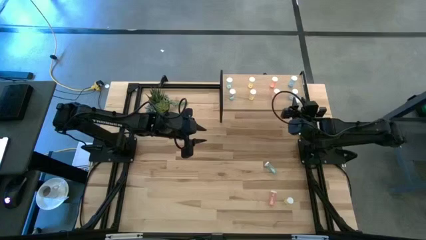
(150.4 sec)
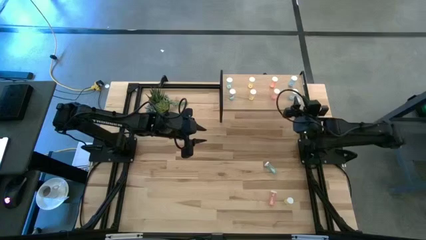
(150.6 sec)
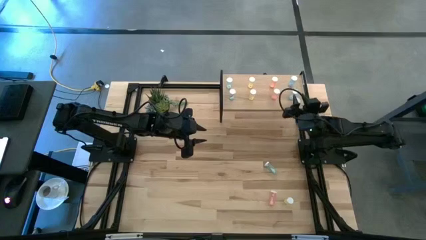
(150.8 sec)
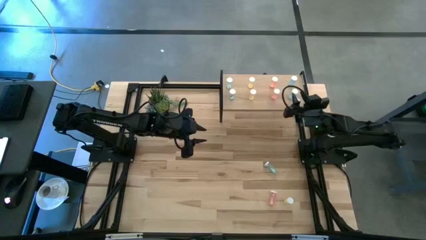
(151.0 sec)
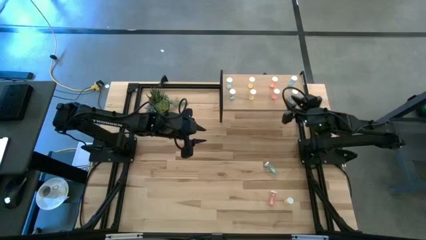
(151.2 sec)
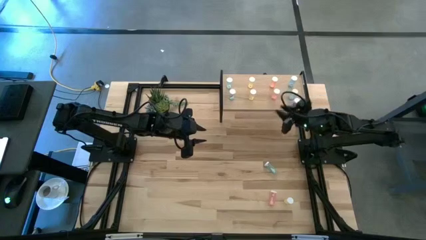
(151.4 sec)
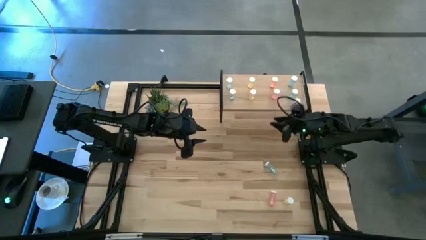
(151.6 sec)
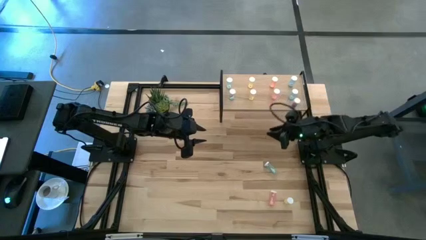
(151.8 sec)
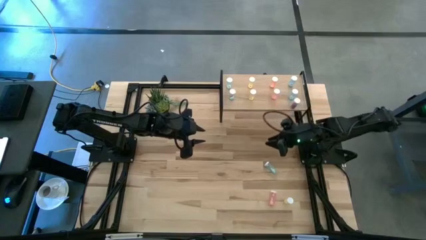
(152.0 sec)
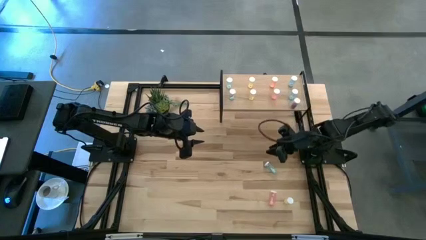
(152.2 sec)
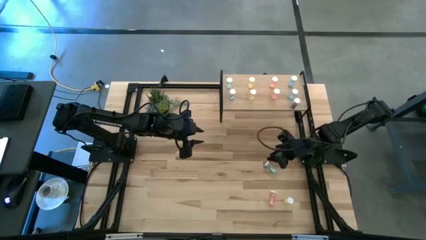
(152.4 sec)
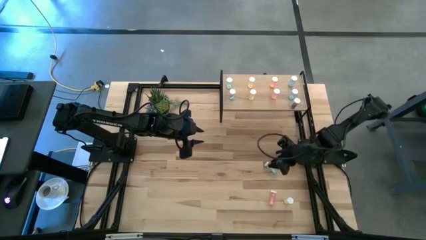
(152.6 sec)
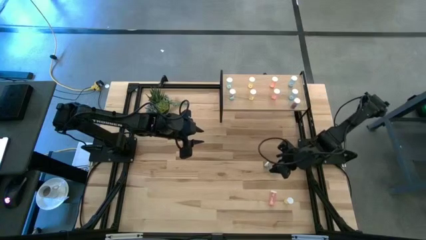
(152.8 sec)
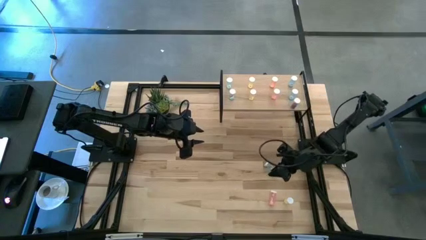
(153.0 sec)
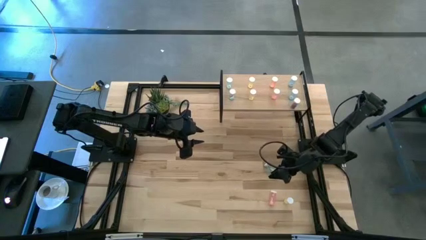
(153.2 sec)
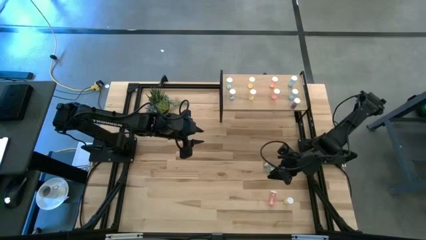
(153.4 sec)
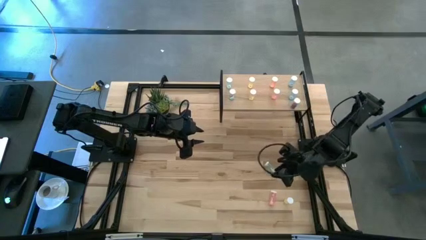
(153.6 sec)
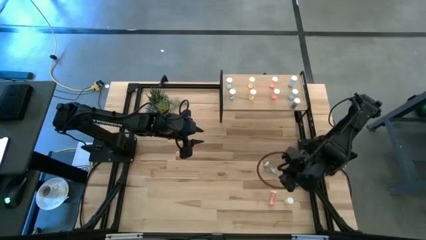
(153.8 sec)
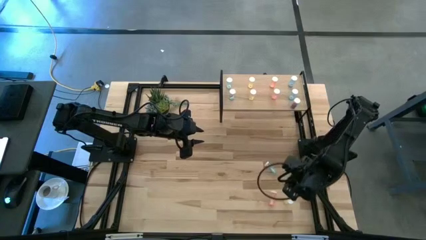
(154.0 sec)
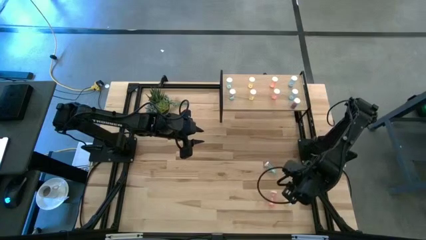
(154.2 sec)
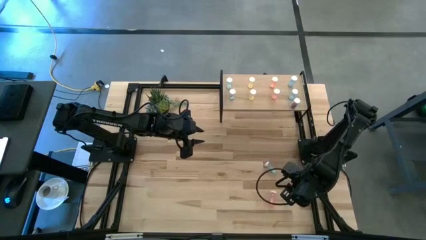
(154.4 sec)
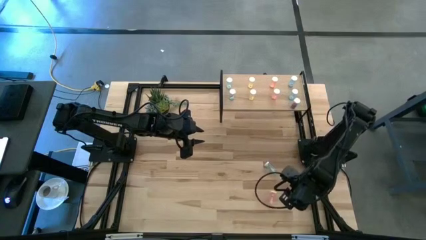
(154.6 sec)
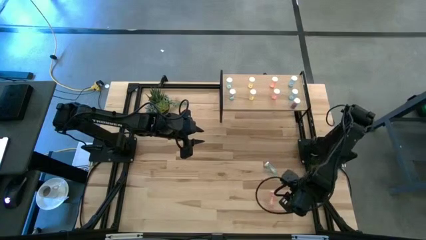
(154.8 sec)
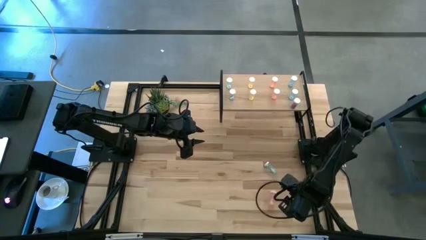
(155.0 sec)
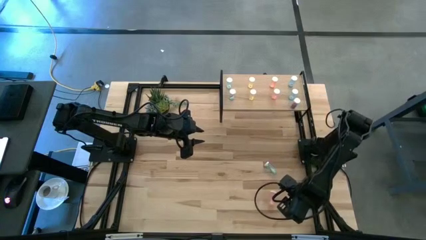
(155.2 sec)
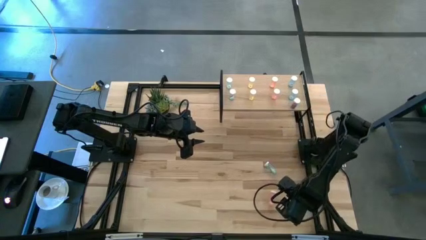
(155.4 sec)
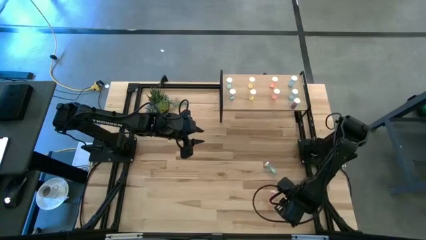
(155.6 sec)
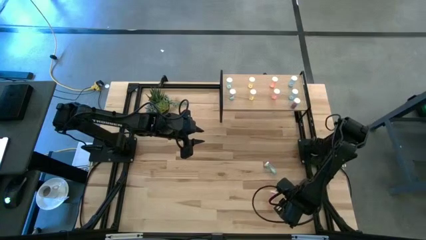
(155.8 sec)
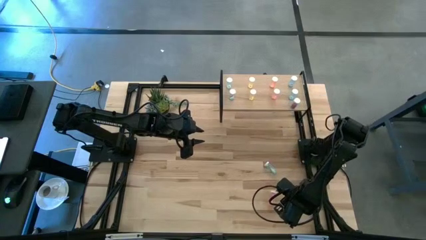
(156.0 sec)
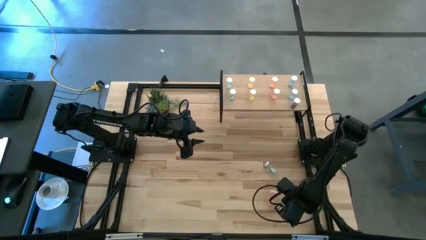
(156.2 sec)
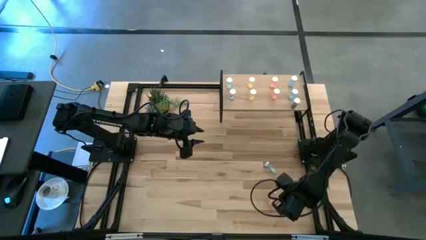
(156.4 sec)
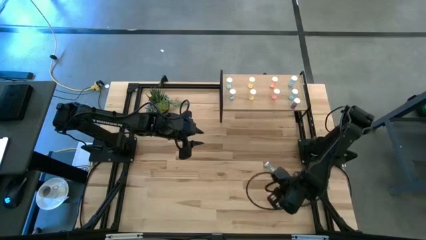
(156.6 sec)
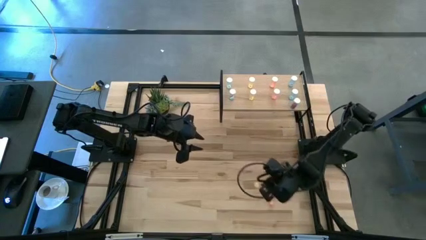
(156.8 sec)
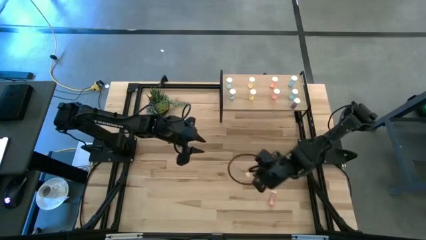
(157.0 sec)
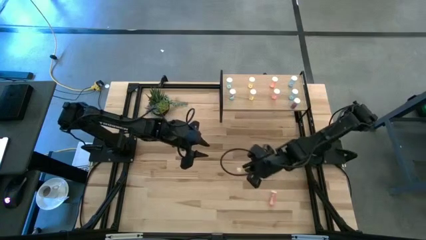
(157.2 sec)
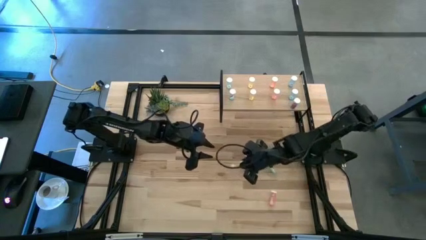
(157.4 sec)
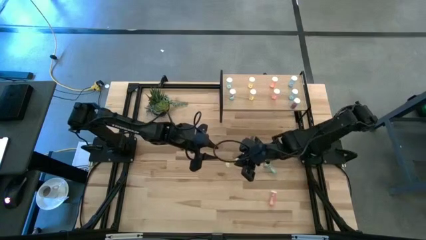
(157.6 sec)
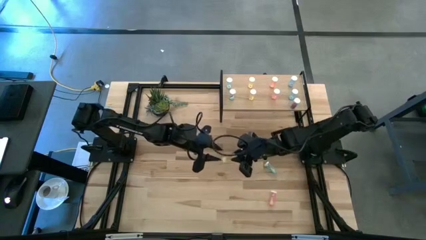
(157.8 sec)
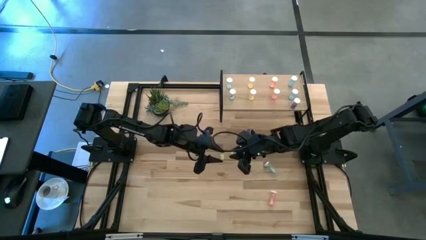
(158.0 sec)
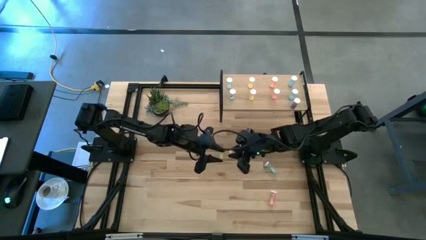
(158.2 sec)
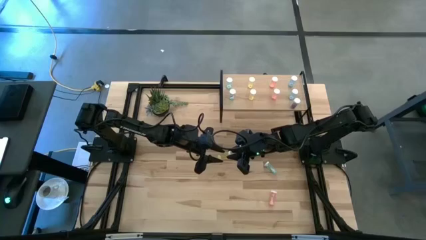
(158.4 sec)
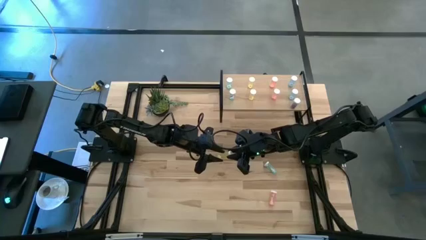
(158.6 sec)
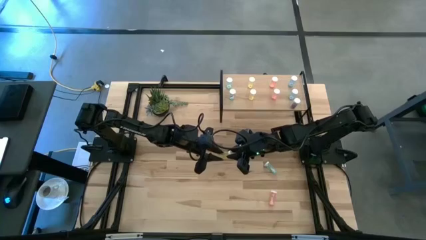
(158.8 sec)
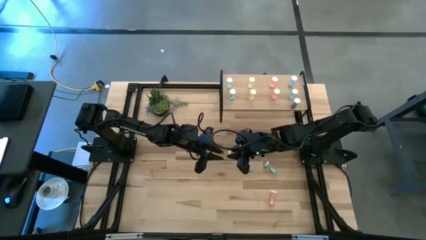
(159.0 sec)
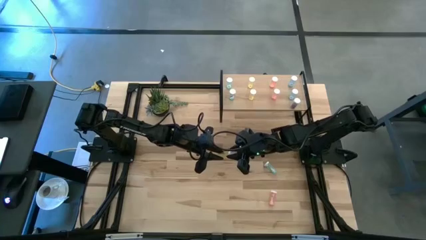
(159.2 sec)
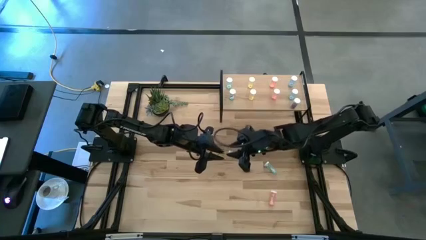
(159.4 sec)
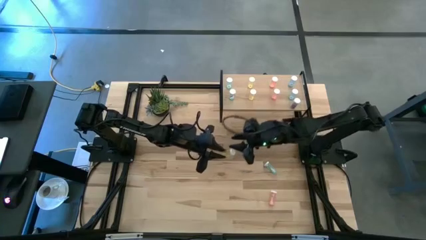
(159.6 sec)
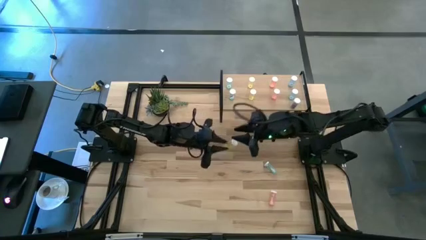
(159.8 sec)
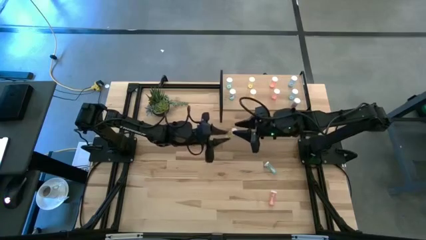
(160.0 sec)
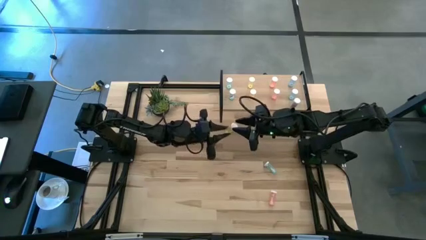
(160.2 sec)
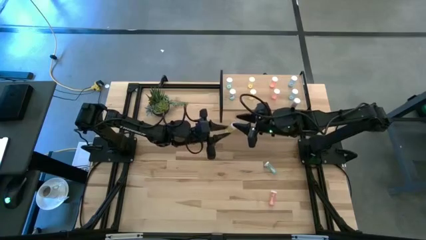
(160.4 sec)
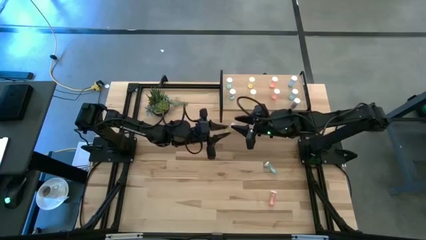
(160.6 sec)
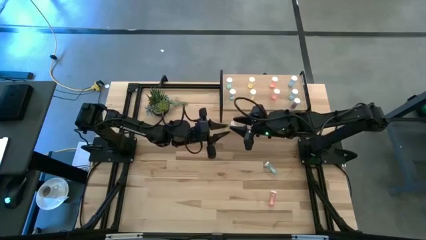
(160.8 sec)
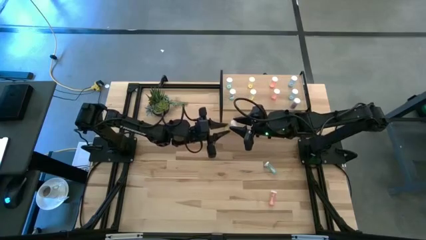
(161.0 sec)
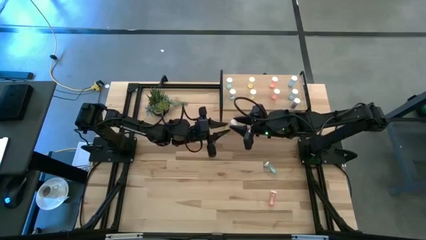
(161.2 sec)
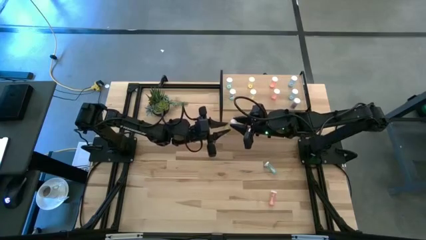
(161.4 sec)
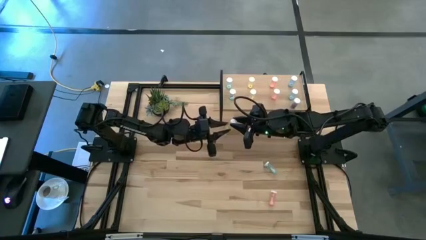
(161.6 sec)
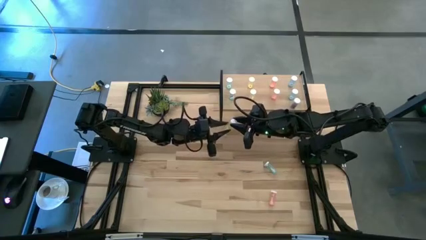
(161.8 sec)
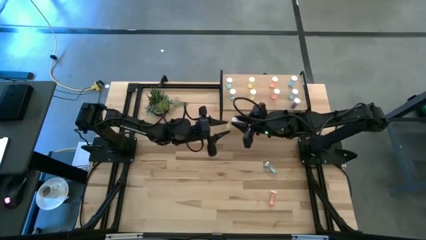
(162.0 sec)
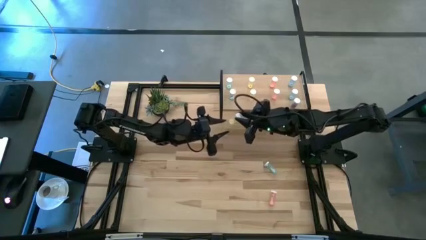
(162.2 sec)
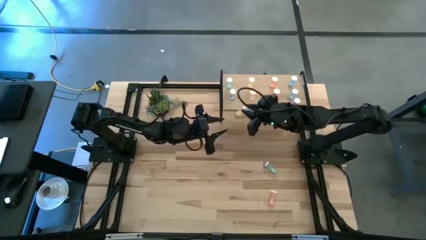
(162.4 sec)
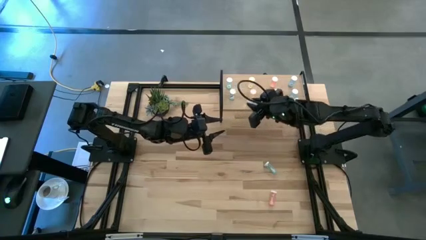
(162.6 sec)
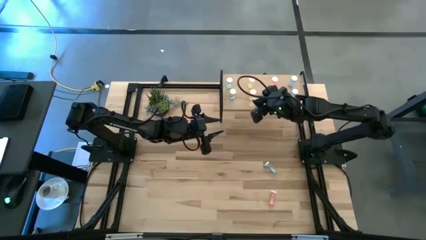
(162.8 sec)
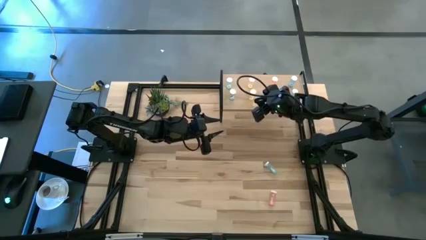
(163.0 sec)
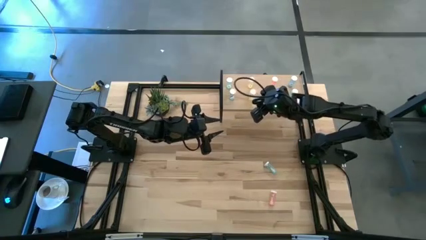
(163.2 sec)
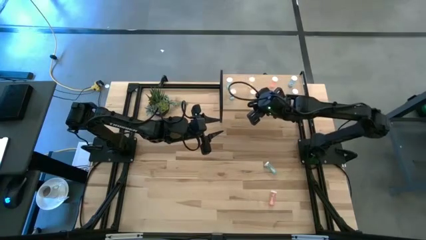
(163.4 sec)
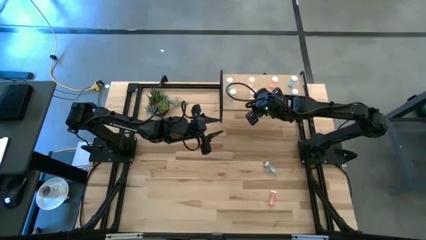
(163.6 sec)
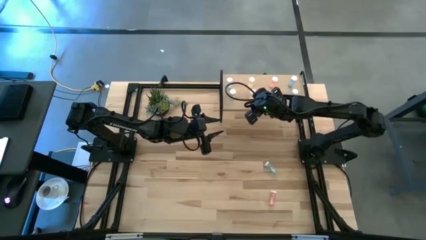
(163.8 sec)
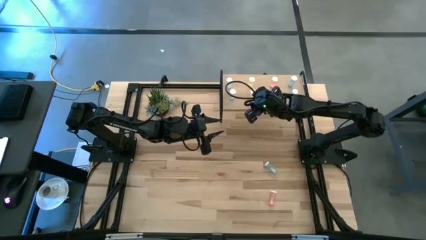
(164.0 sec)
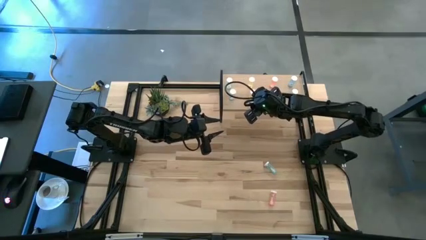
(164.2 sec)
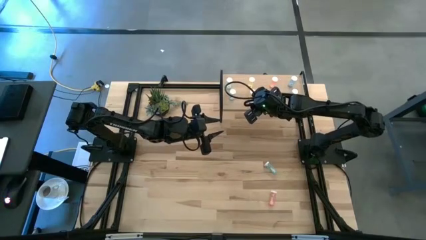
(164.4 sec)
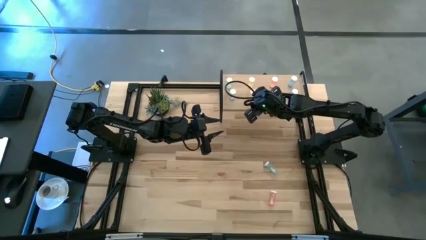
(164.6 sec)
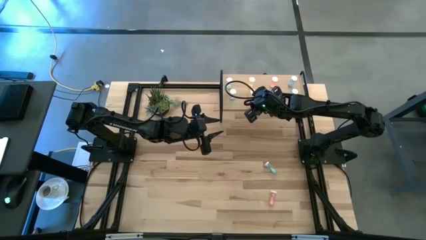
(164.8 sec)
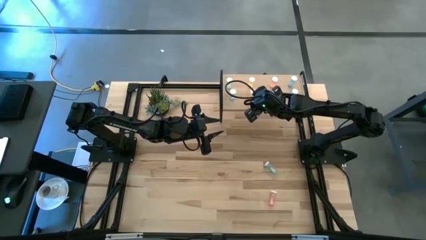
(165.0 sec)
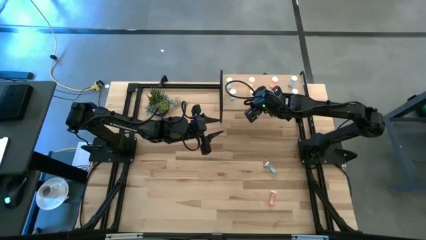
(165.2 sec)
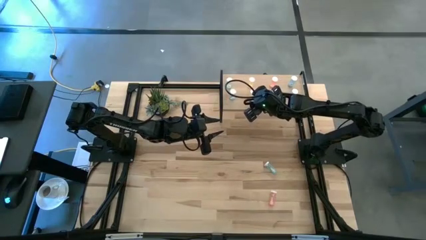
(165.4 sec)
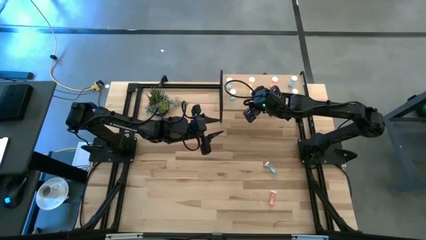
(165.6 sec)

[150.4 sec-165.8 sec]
Task: Pick and place medicine bottles onto shelf by color
Put the yellow pill bottle aligned with the other yellow pill bottles on the shelf
